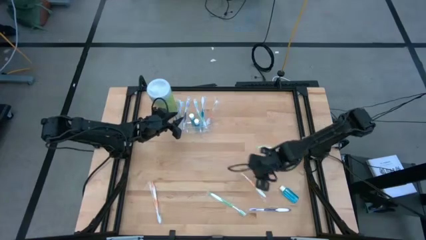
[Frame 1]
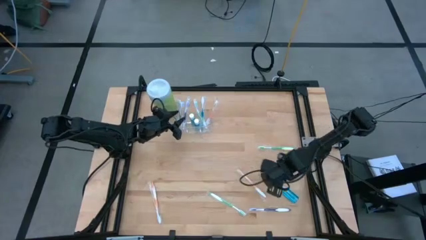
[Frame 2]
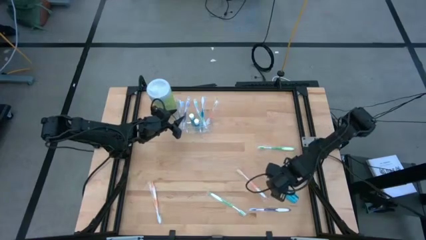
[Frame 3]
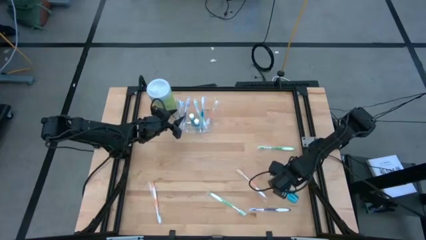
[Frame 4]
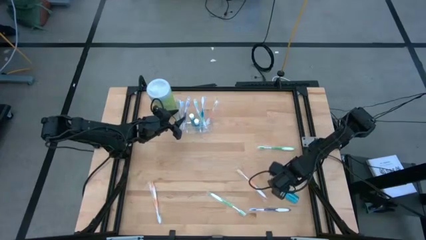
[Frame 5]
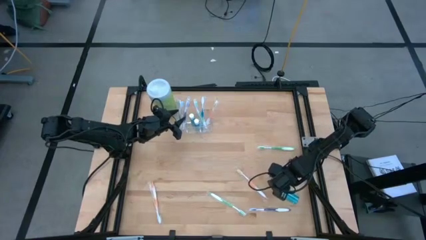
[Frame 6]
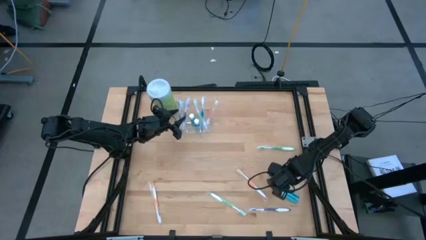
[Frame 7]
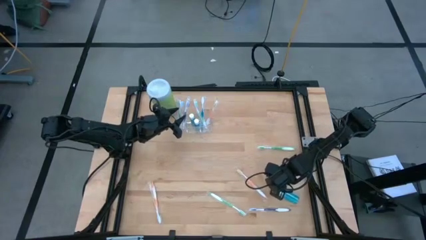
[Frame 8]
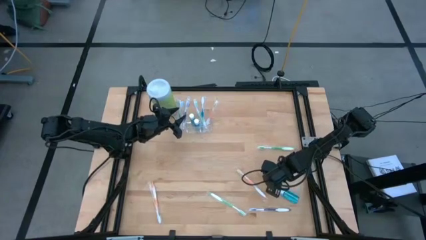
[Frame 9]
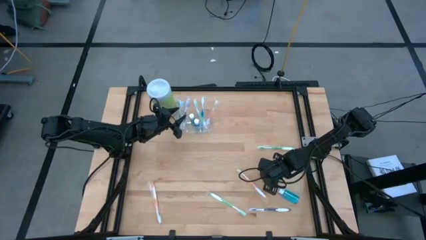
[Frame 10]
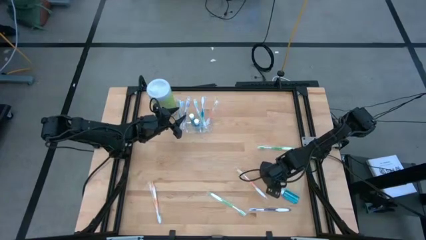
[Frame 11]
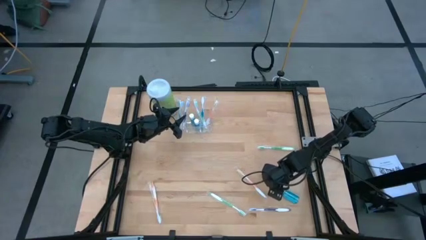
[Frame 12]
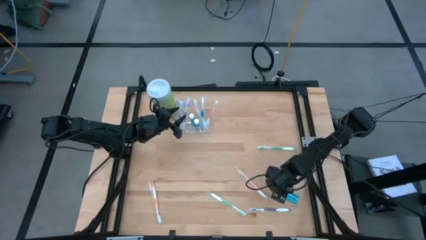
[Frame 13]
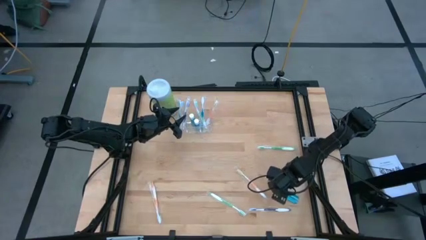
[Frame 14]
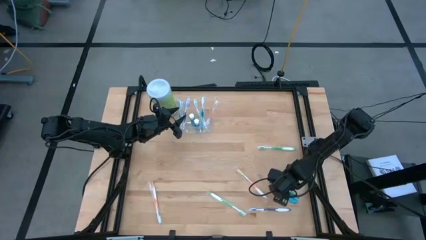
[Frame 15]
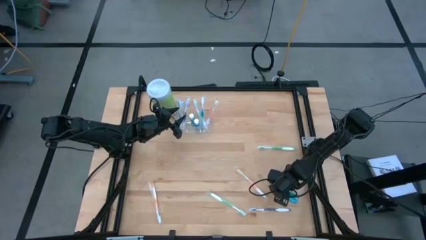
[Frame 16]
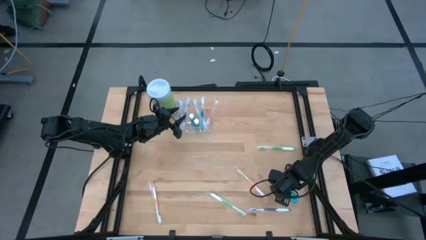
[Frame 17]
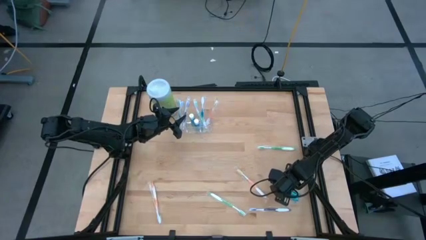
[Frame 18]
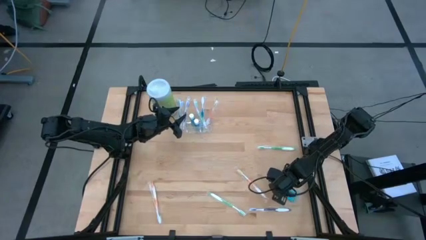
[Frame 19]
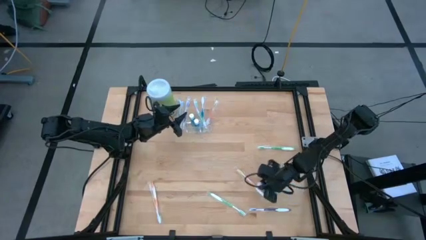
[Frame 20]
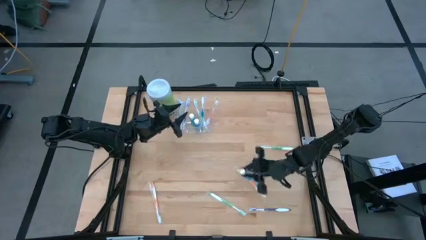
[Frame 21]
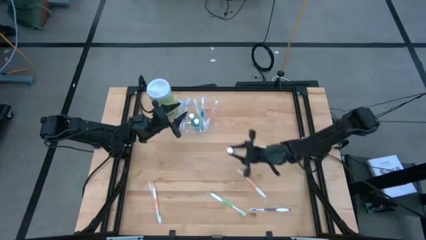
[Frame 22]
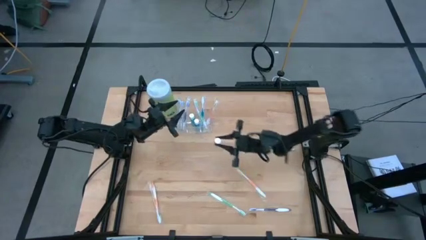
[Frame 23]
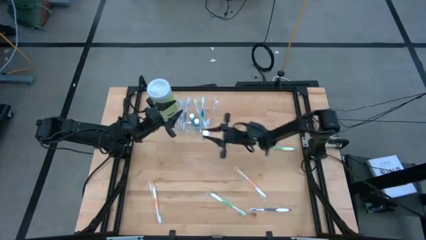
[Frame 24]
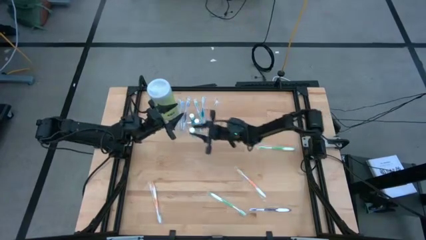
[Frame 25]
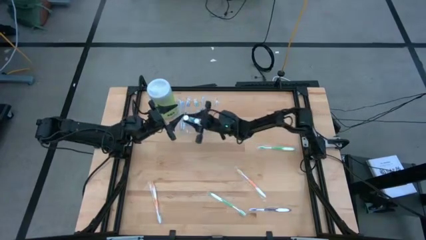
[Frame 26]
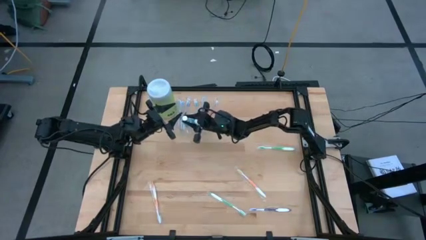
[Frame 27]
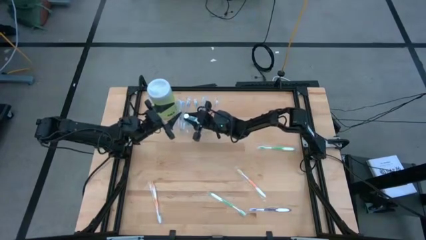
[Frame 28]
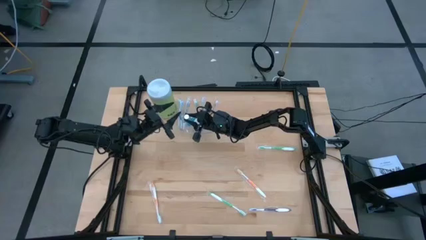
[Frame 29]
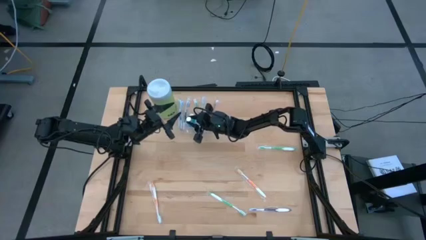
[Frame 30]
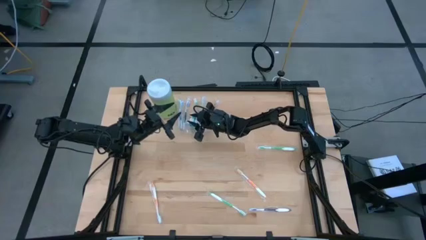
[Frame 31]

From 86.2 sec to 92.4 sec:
Task: Pick & Place toothbrushing station
Put the blue mouthwash into the transparent organizer

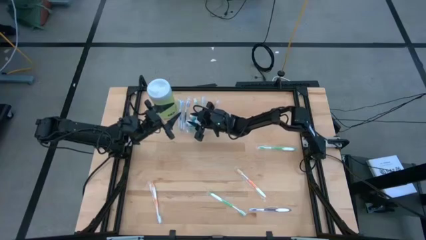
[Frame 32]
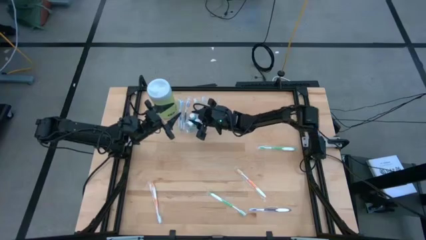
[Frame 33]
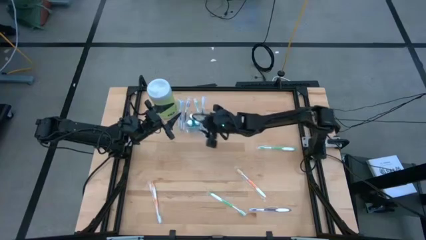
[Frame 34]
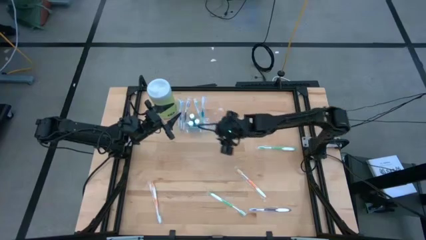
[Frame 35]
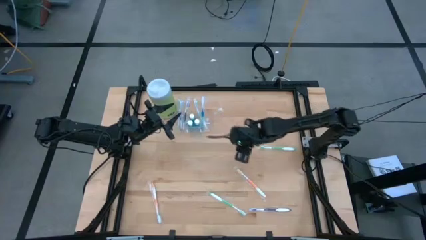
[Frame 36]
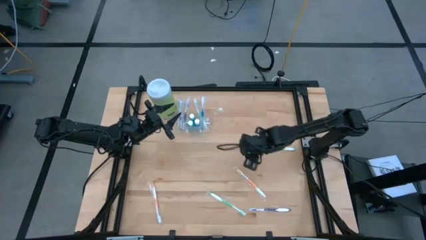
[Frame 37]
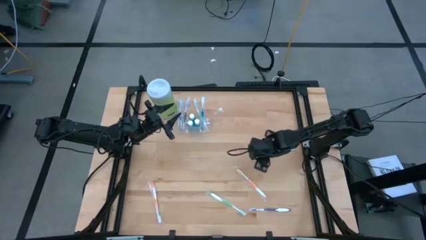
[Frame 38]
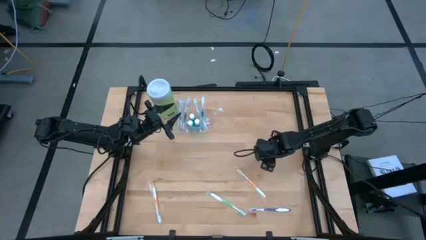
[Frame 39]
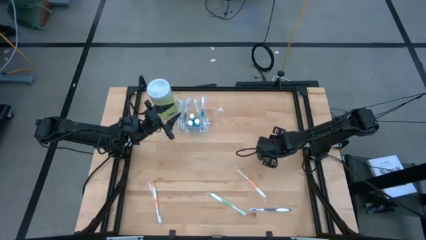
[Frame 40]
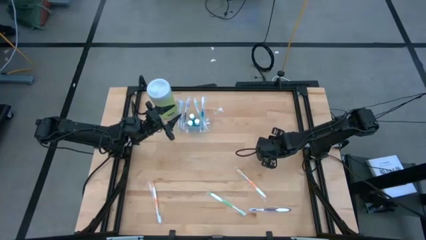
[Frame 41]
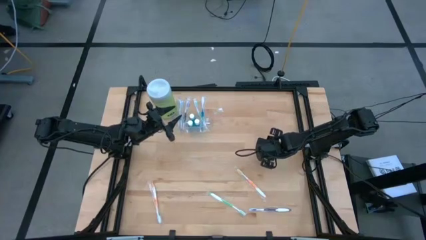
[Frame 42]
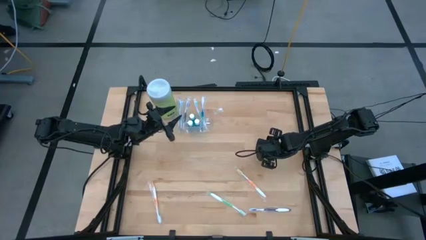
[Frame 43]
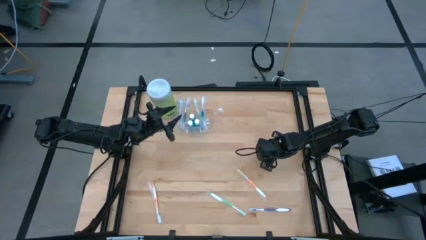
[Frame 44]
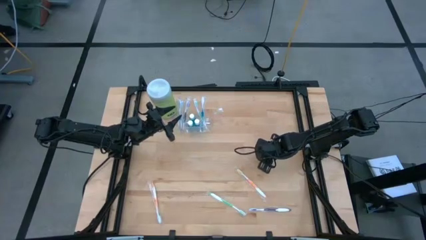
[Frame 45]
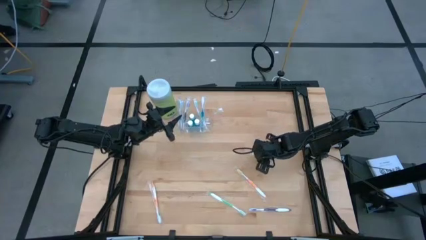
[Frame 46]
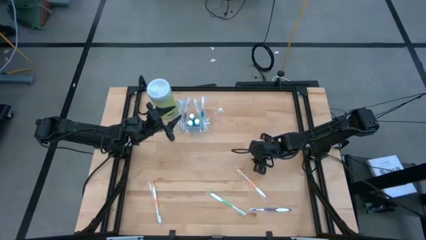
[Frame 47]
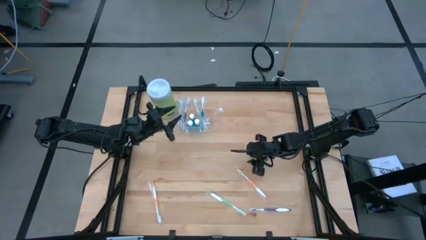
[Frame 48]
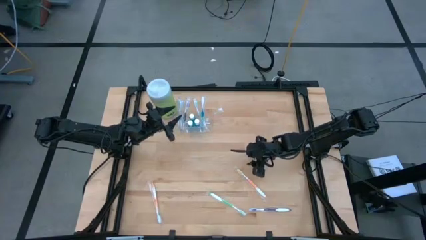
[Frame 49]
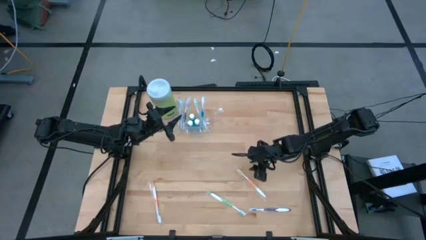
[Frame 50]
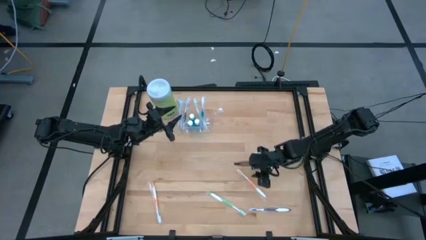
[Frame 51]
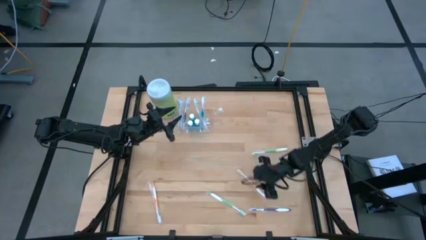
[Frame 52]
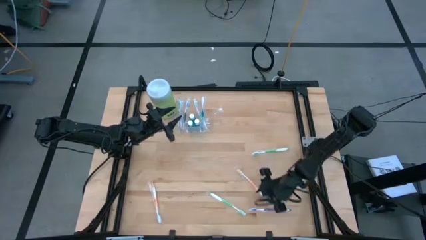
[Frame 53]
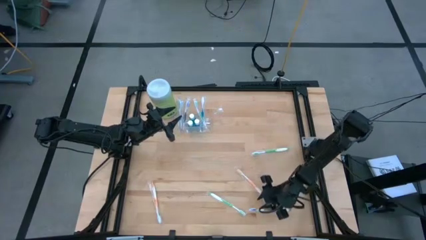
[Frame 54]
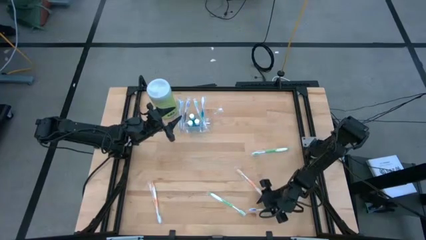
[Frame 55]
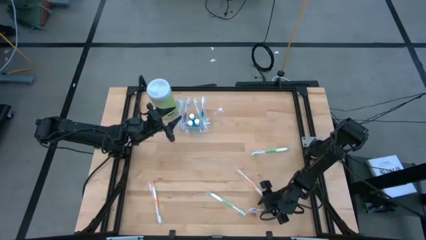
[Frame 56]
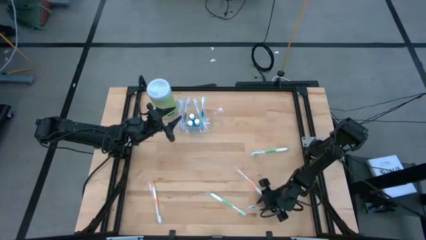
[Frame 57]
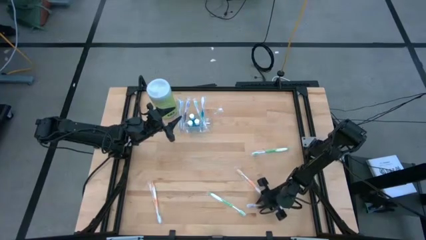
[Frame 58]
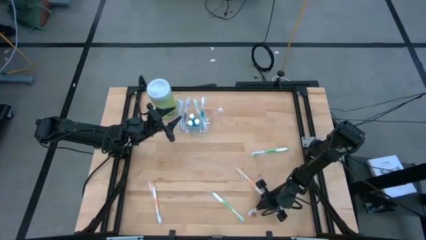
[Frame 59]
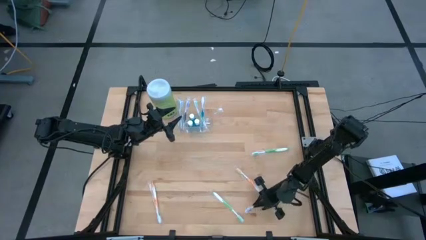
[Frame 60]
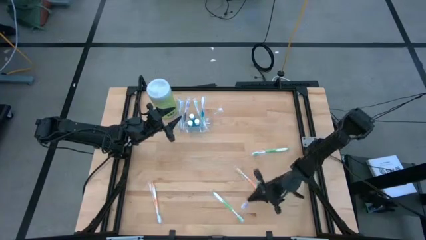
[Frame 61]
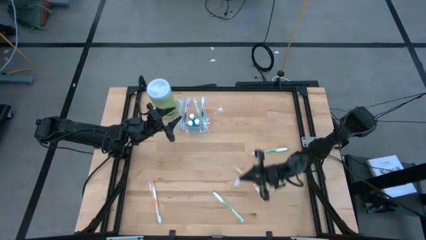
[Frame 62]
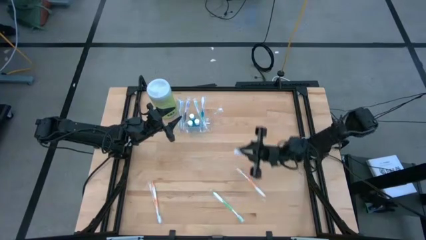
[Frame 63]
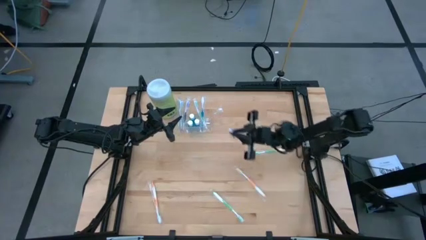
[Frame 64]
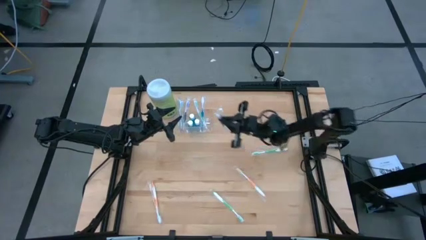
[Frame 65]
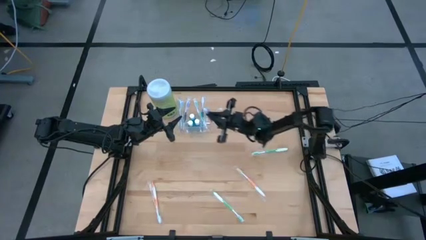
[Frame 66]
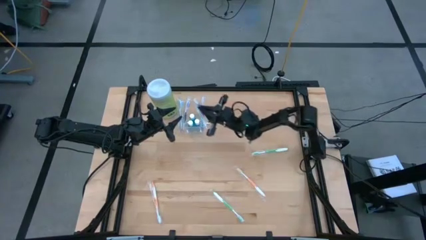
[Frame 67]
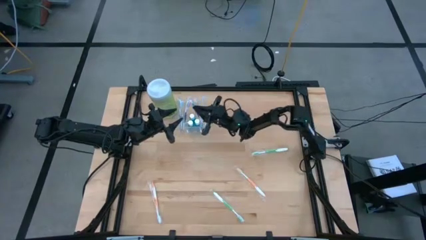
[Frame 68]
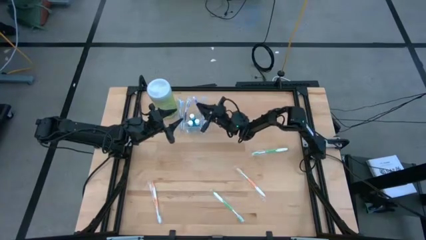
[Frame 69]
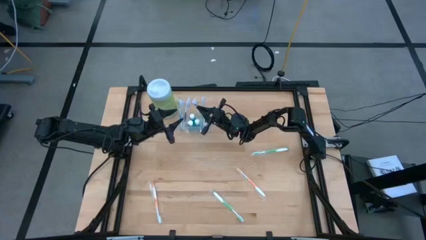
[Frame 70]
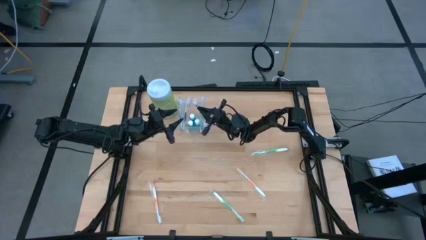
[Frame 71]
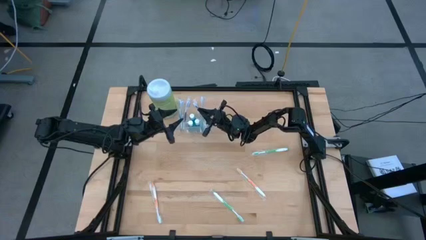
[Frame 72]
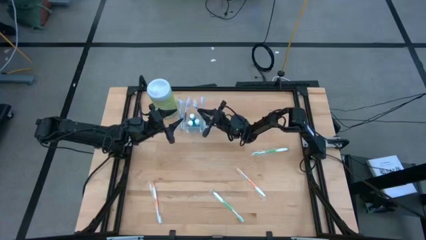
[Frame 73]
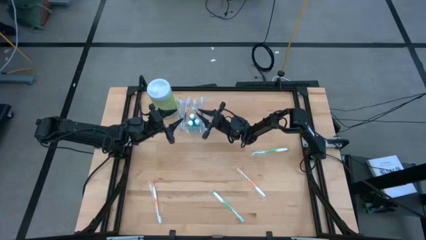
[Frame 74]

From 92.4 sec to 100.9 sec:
Put the purple toothbrush into the transparent organizer
